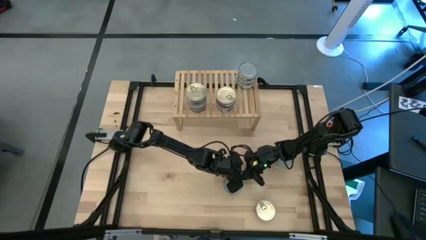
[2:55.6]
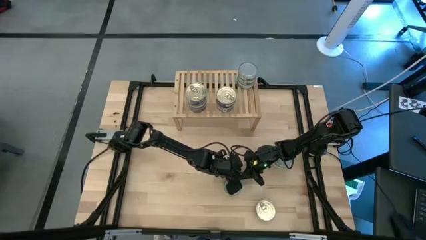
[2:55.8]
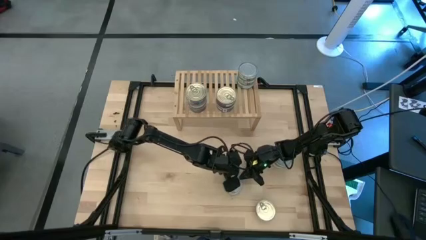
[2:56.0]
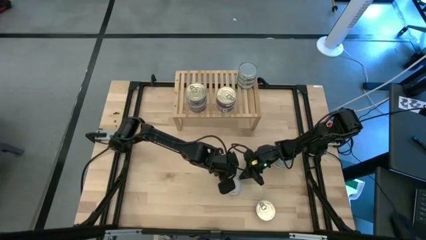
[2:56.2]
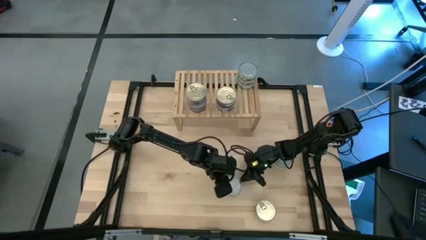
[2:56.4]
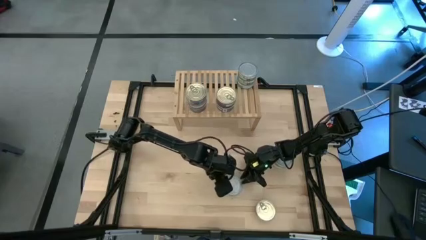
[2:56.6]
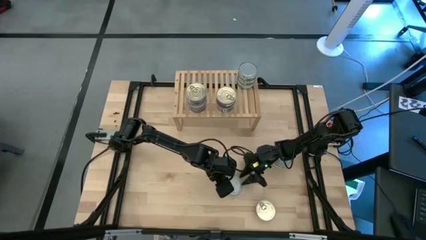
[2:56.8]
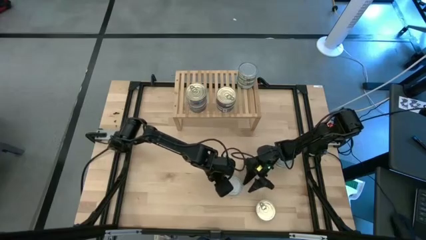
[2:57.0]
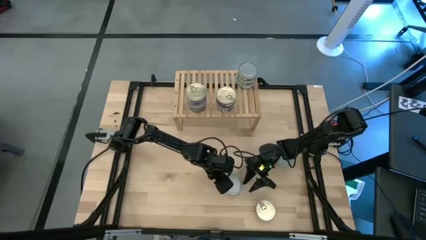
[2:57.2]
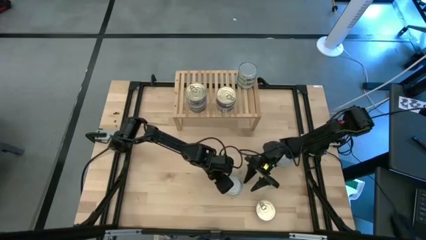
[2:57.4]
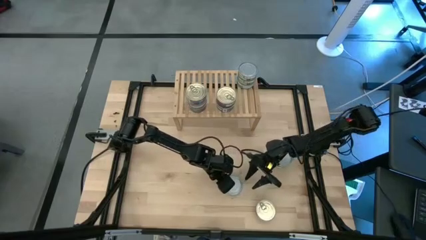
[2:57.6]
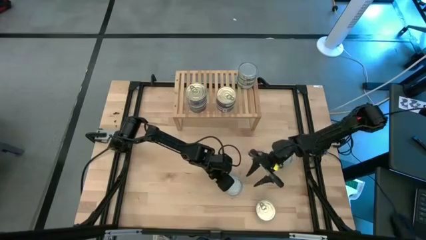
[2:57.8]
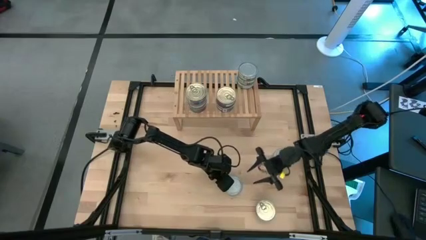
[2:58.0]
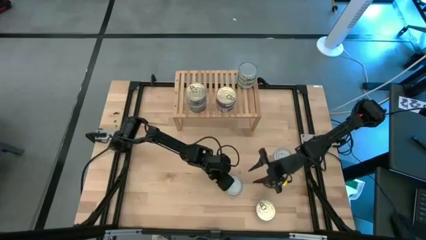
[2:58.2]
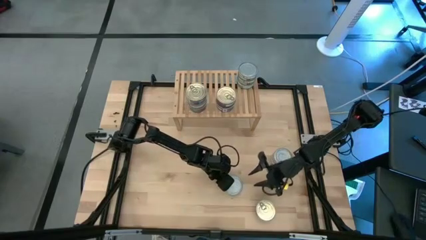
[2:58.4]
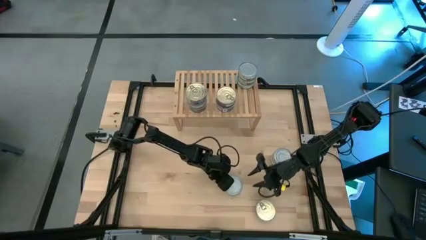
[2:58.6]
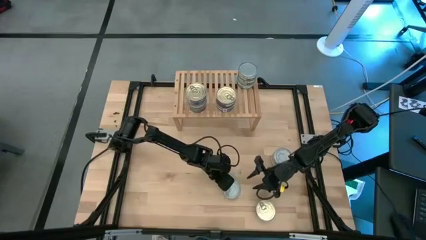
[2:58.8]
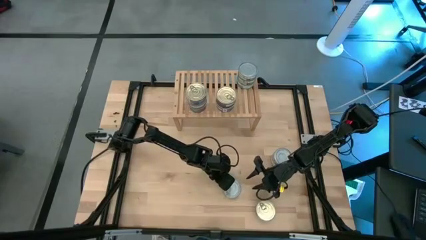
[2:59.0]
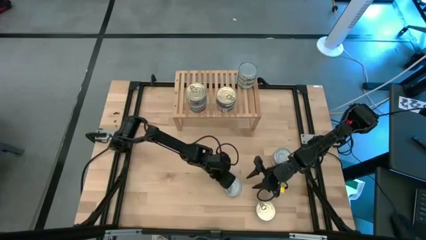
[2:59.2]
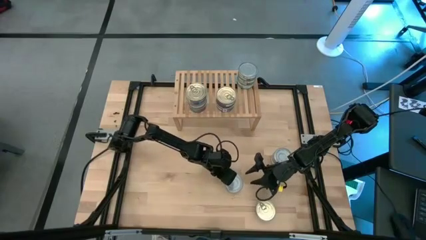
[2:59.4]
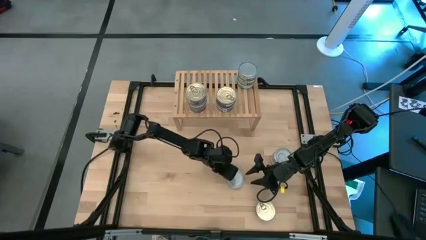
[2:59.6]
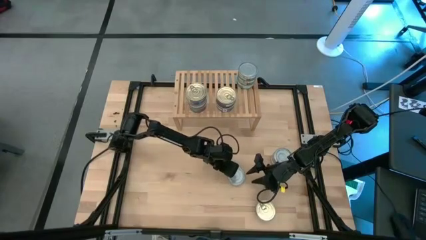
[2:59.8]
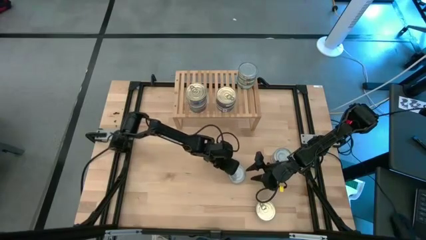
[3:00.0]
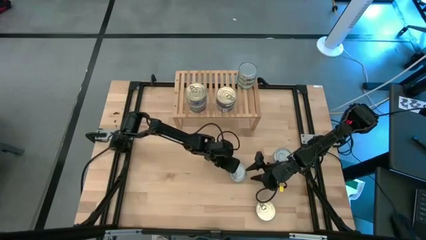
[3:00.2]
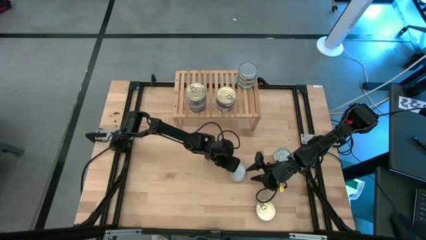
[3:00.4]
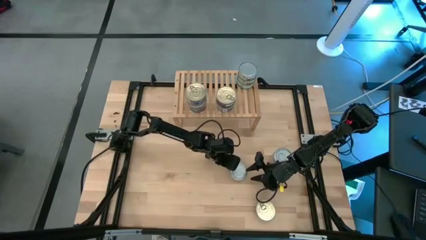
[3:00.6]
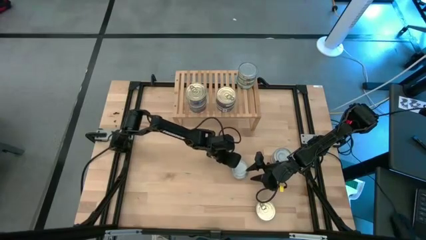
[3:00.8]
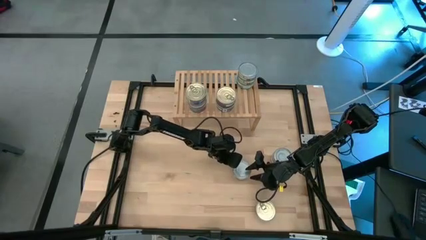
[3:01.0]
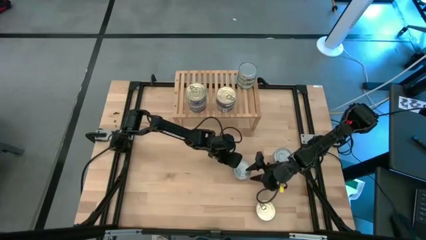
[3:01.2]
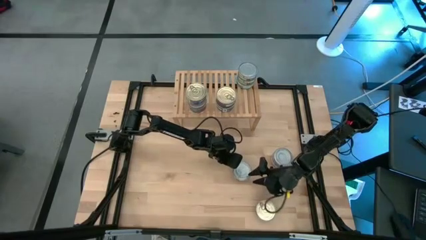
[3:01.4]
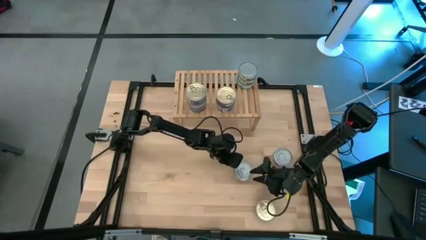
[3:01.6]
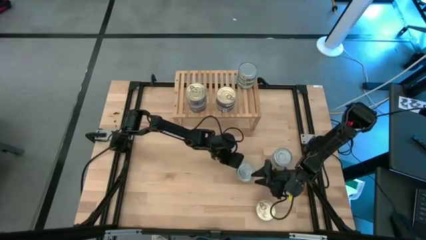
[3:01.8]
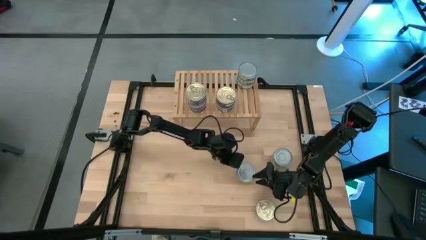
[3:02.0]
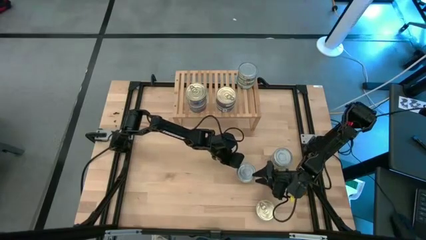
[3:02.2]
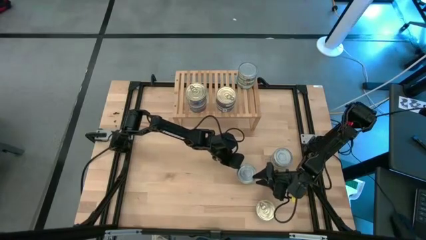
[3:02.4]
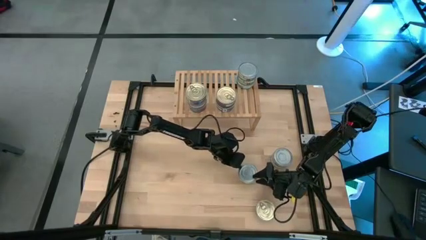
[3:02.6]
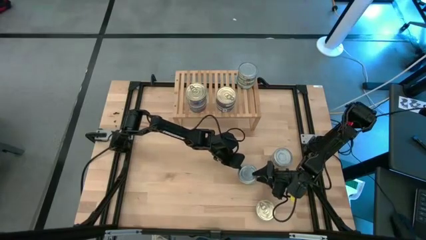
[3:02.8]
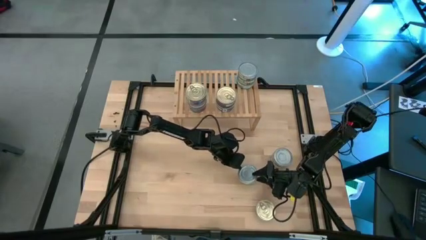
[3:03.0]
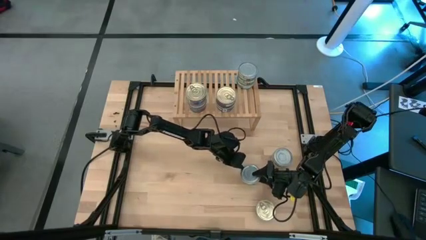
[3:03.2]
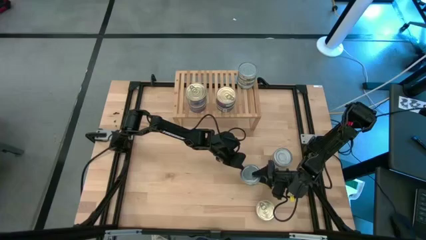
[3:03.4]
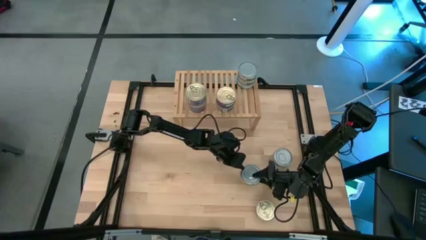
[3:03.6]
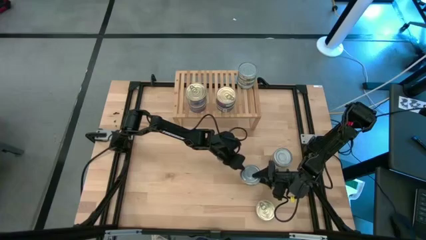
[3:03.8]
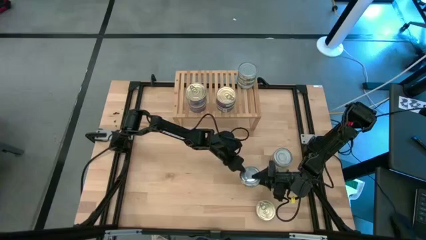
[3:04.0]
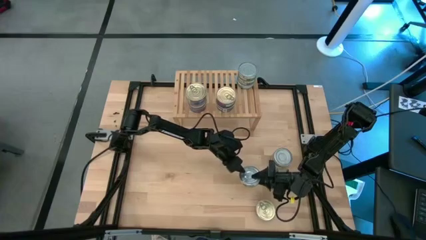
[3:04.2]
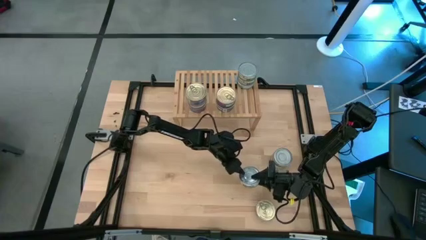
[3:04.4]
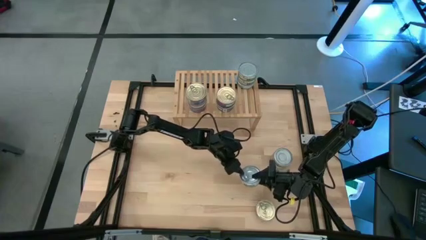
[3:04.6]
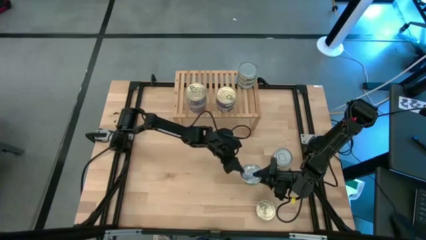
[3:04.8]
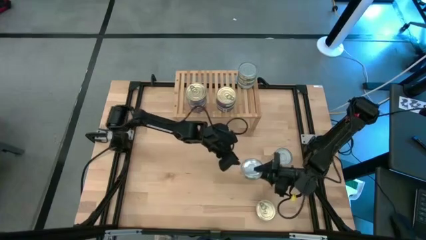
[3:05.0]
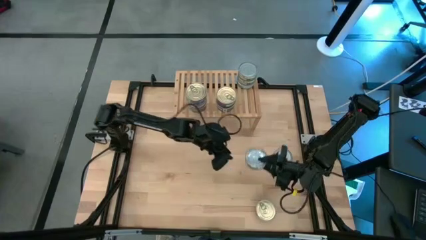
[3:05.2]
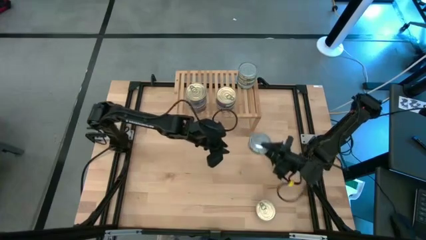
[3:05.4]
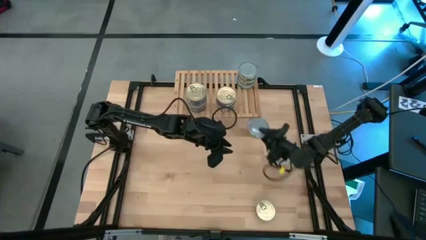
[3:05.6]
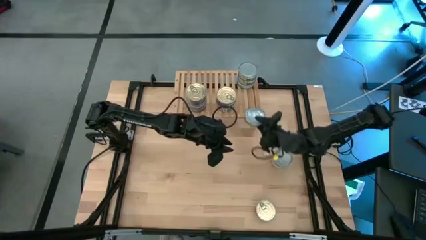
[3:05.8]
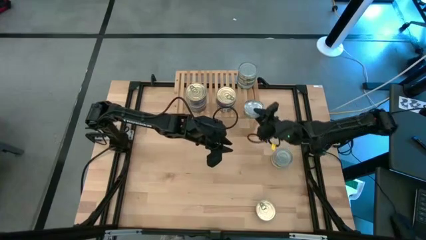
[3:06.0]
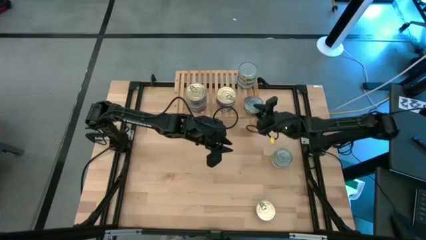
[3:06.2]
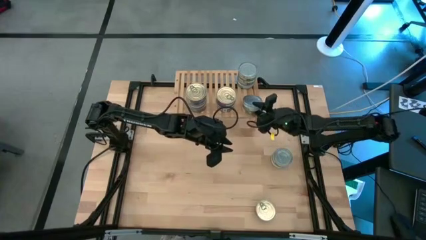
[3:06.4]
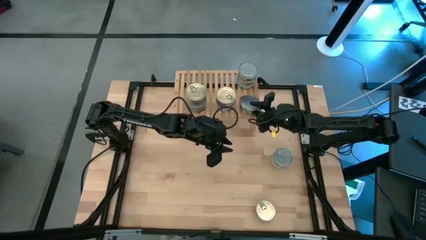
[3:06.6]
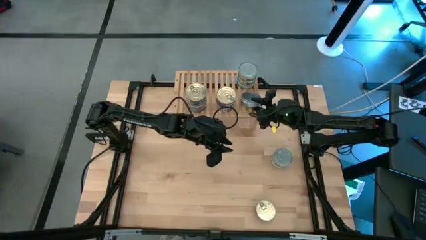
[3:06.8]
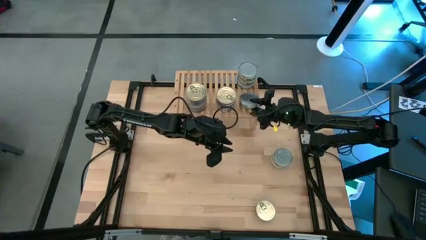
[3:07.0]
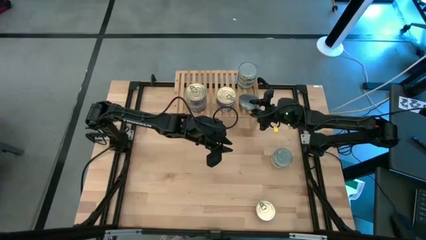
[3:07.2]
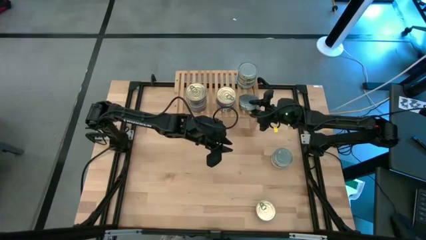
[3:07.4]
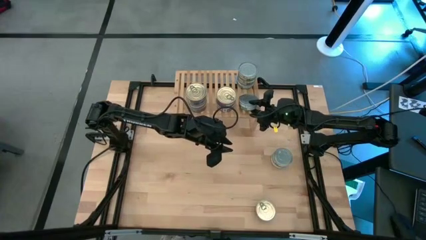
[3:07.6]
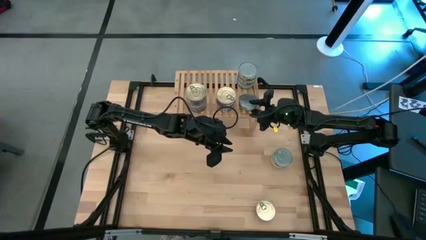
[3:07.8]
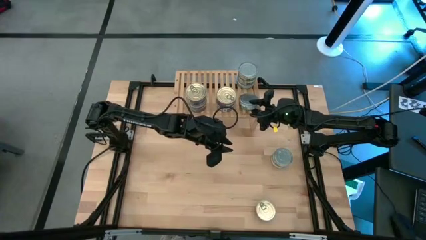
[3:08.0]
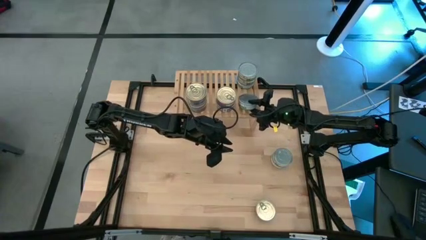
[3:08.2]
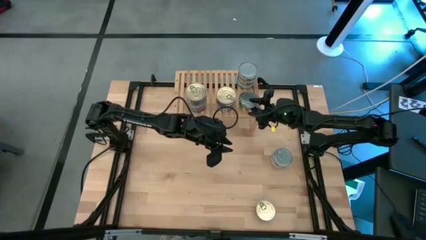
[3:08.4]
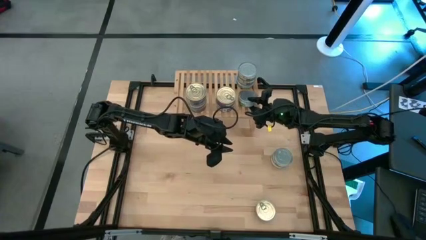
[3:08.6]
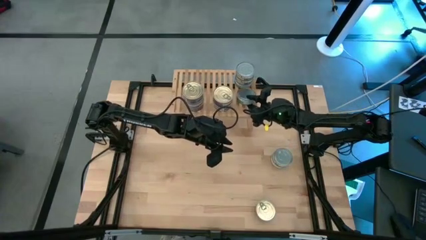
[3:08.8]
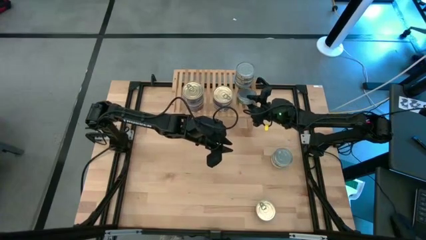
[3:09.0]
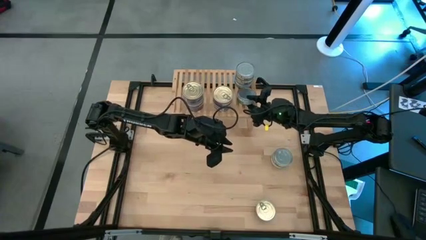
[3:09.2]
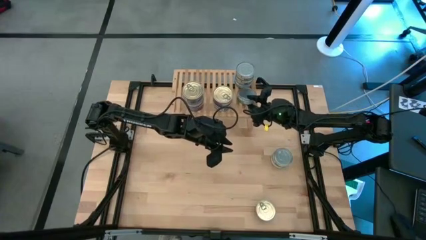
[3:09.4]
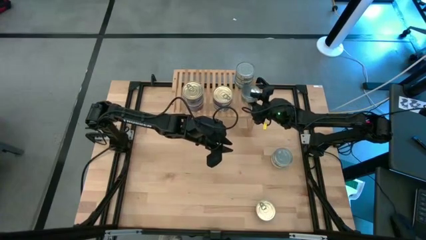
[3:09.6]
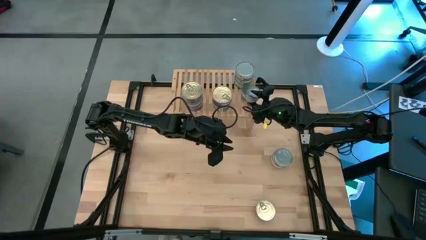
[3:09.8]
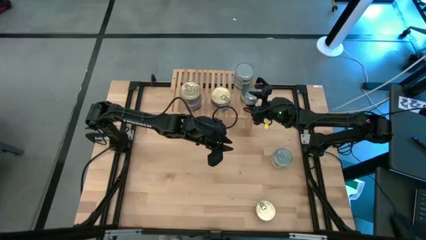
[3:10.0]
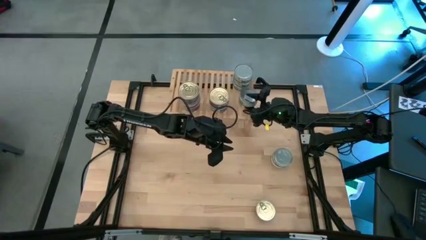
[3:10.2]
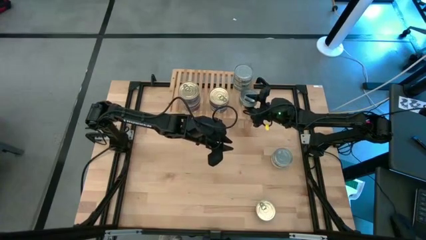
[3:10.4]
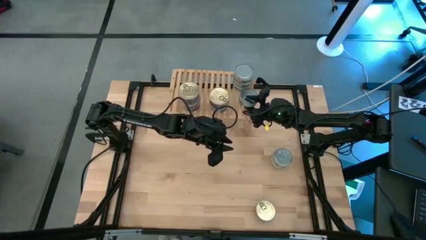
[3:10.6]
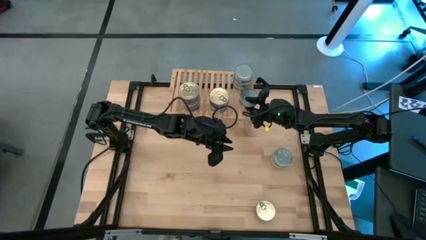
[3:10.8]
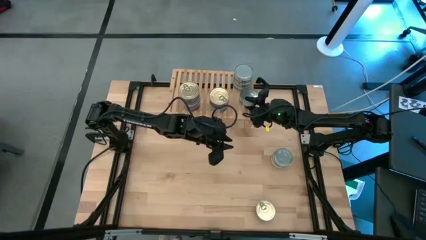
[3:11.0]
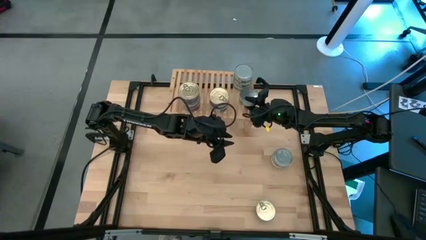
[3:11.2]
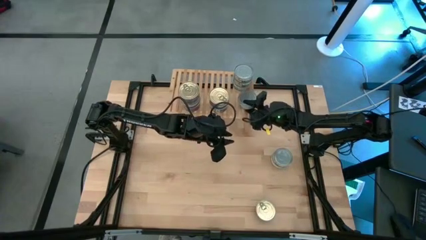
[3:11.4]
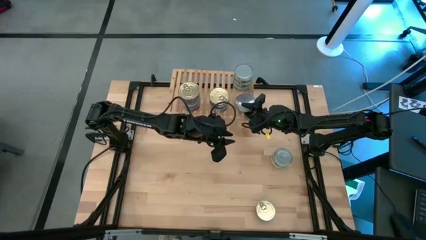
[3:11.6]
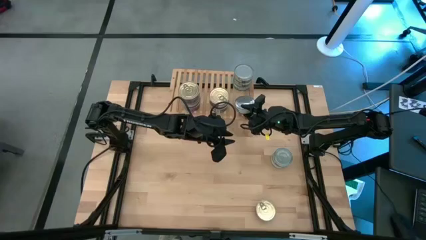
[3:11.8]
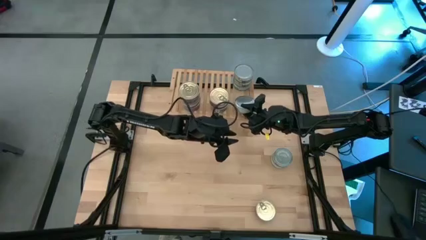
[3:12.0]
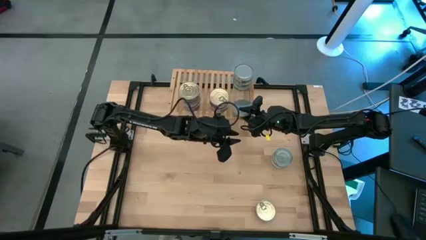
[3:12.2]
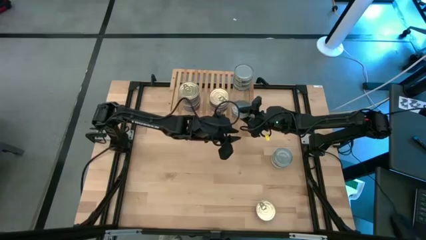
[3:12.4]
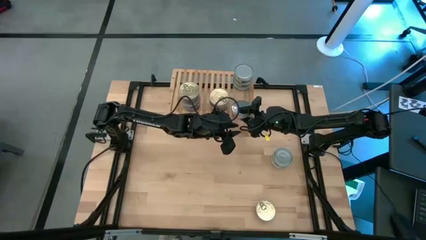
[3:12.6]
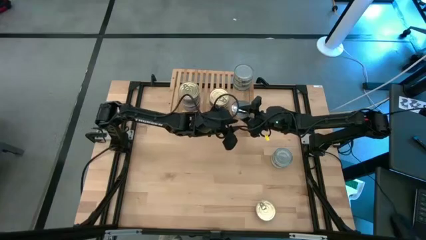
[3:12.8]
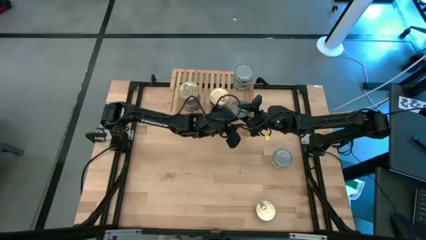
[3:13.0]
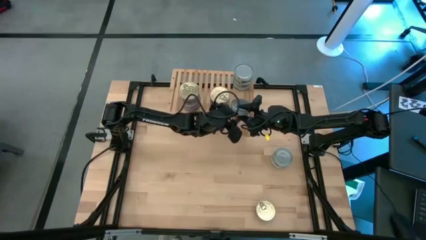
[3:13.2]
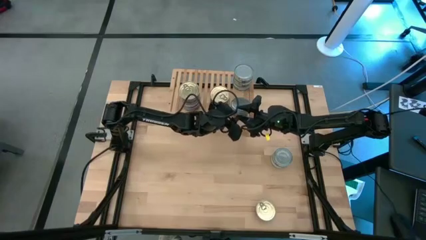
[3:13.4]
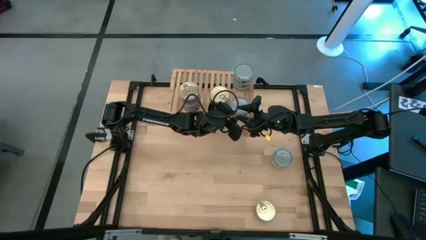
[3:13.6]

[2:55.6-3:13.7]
Task: Stack canned seafood by type on shelf
Put the green tuna can on the shelf
